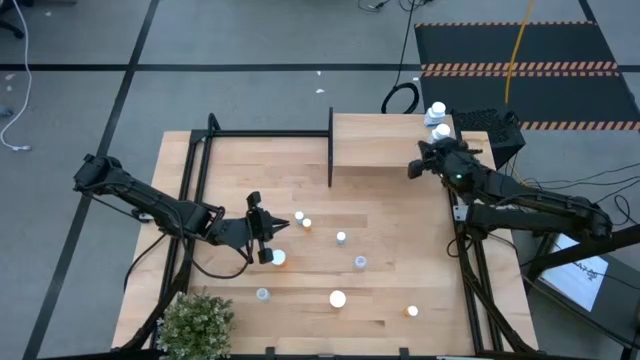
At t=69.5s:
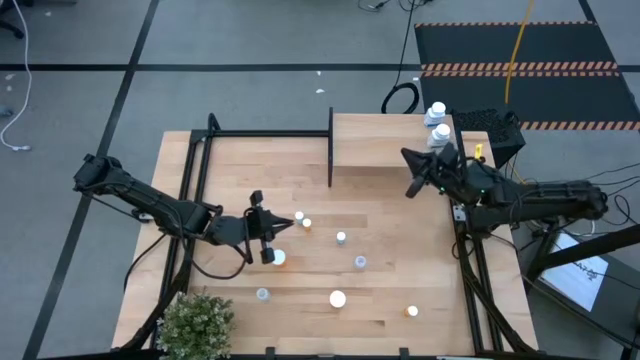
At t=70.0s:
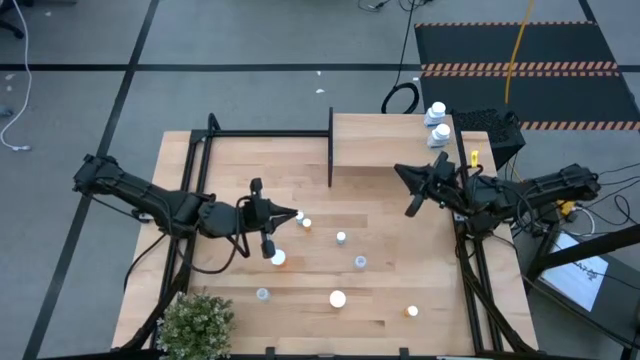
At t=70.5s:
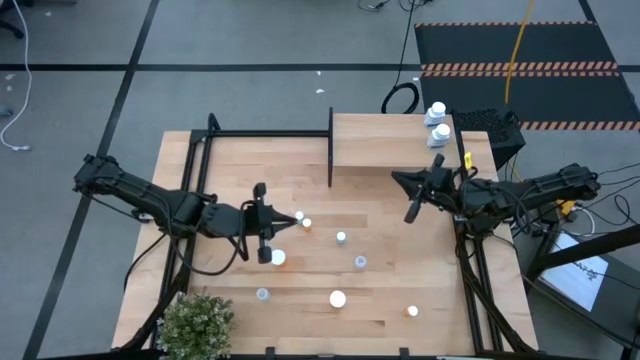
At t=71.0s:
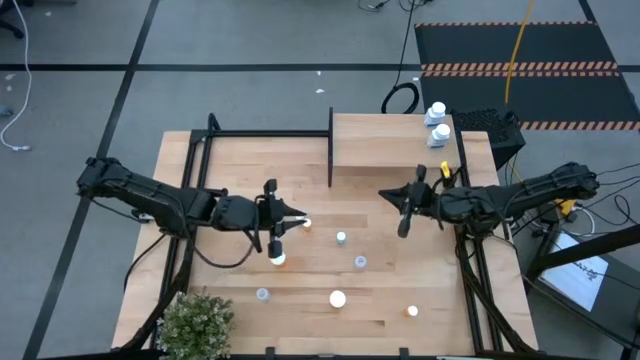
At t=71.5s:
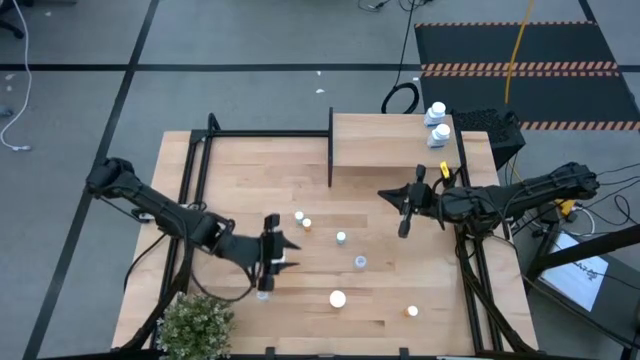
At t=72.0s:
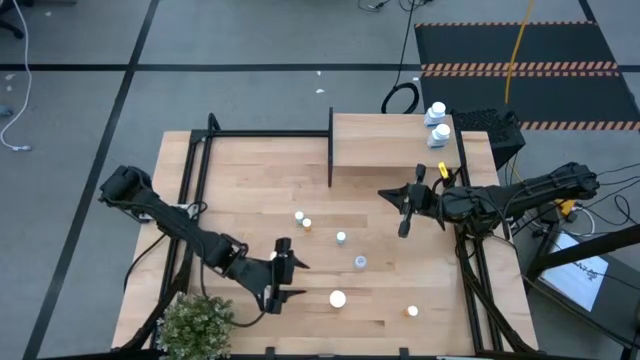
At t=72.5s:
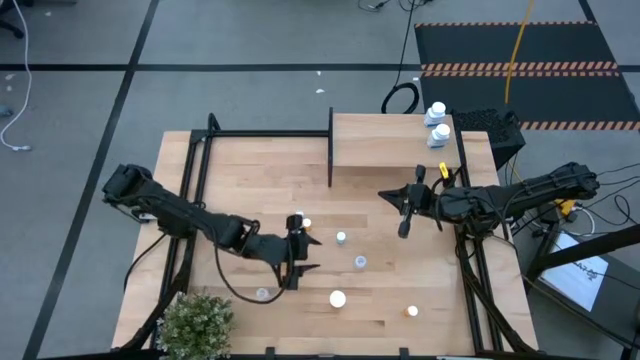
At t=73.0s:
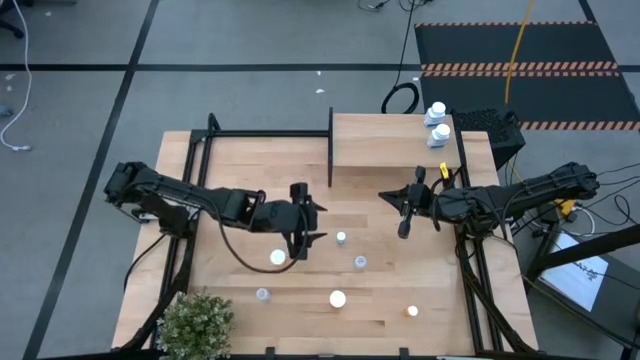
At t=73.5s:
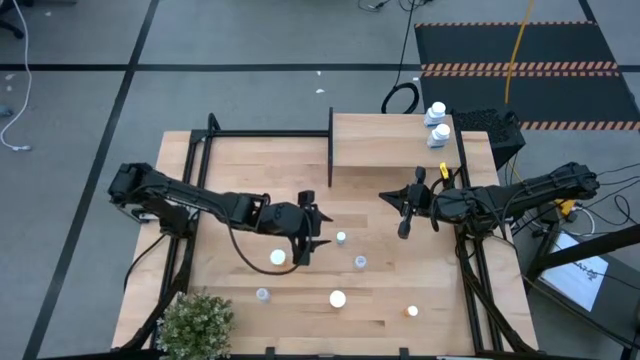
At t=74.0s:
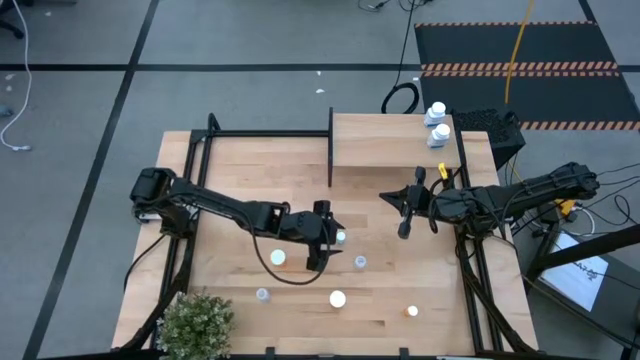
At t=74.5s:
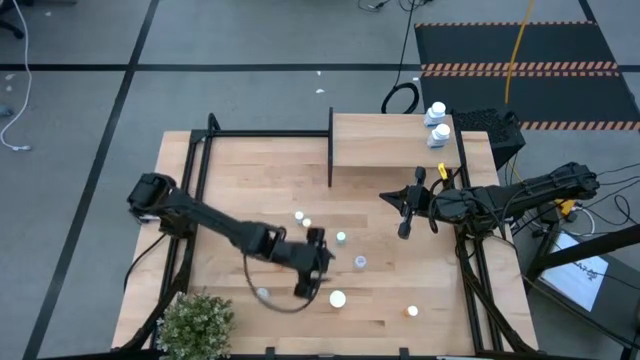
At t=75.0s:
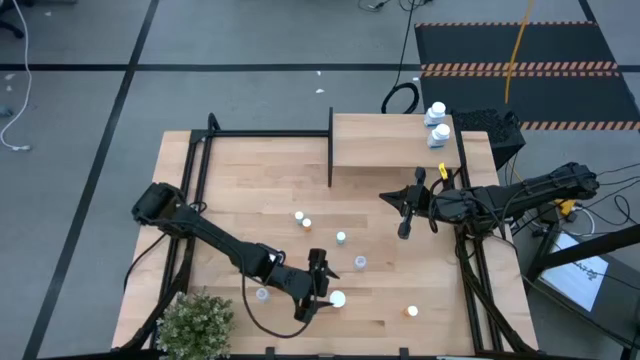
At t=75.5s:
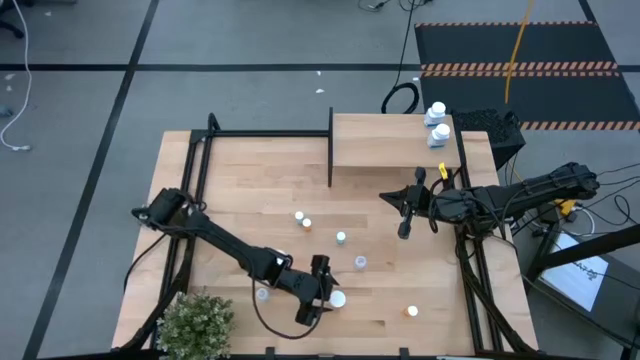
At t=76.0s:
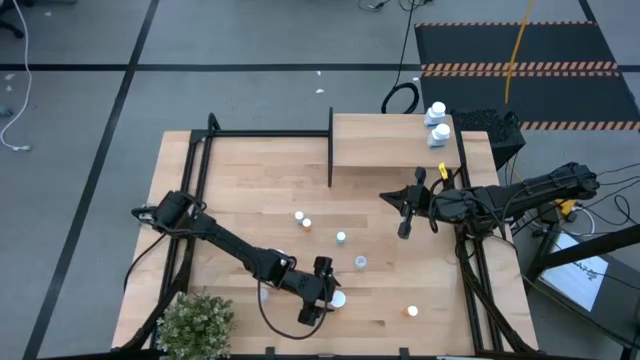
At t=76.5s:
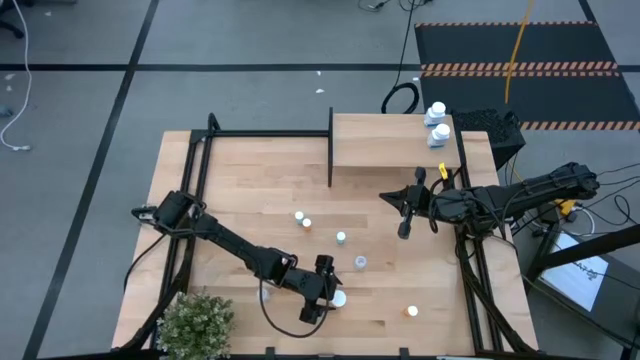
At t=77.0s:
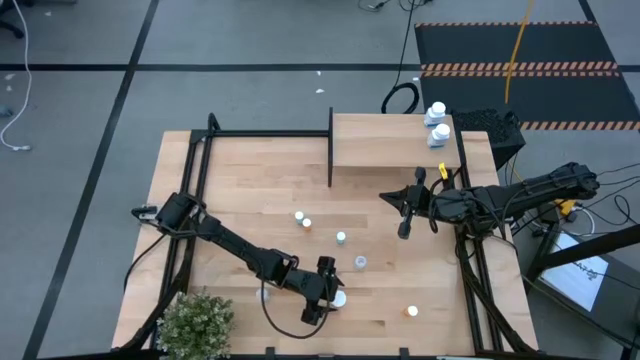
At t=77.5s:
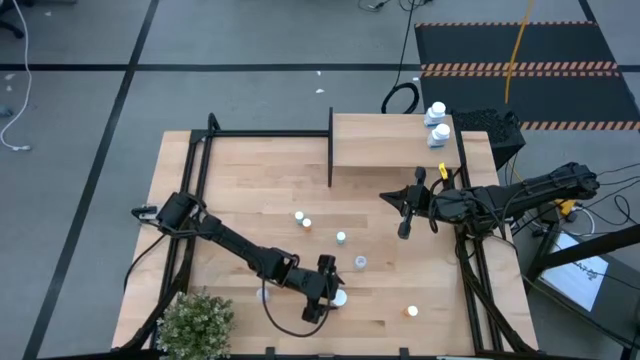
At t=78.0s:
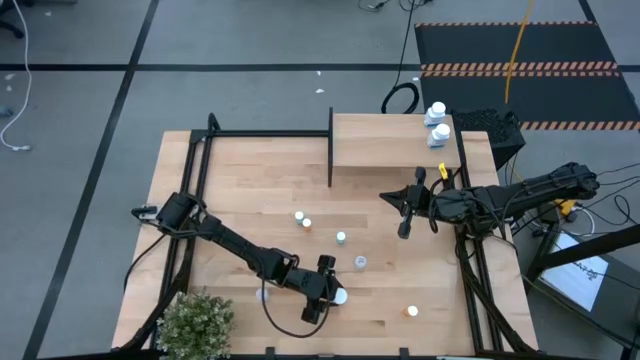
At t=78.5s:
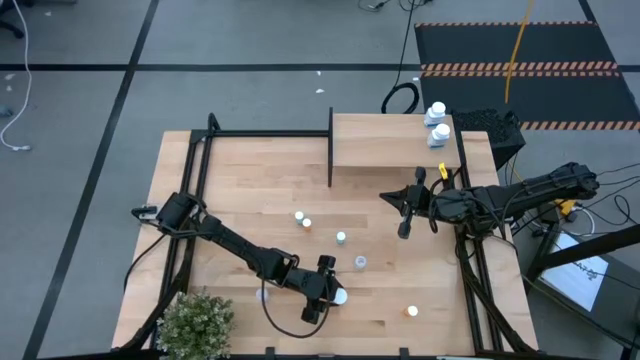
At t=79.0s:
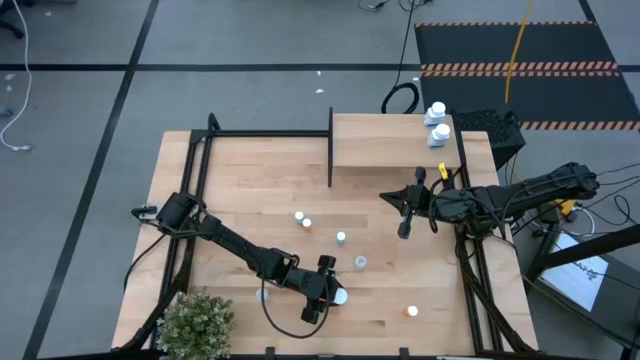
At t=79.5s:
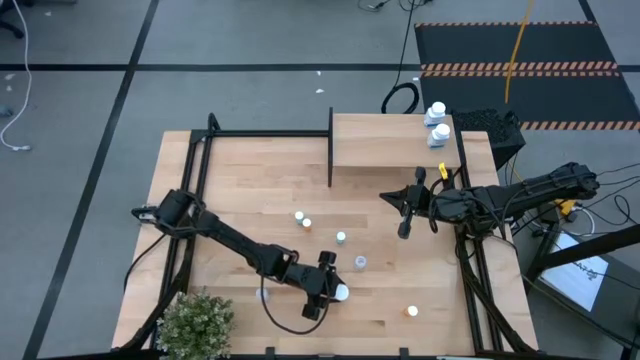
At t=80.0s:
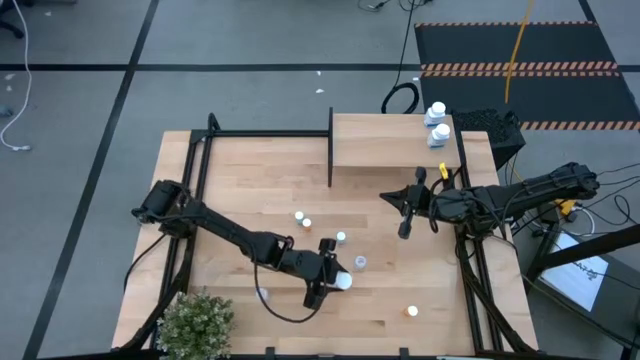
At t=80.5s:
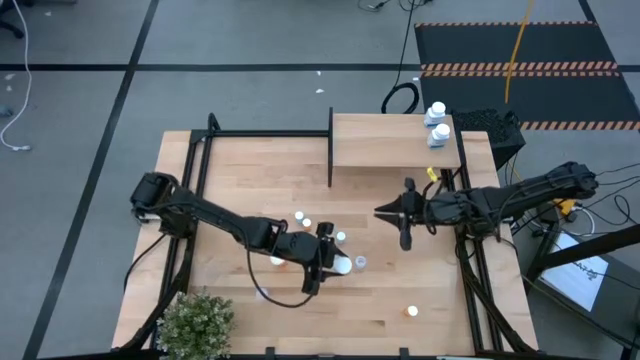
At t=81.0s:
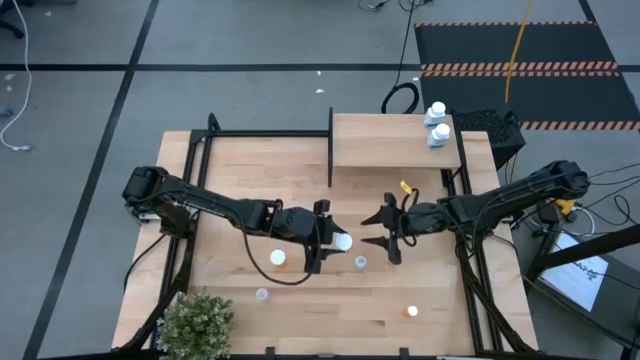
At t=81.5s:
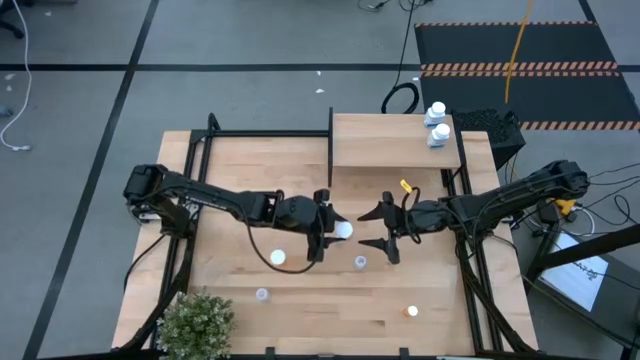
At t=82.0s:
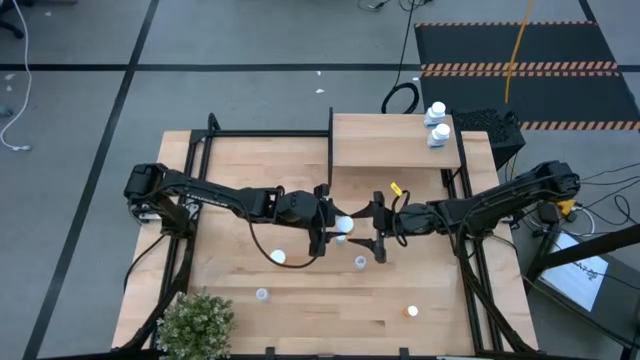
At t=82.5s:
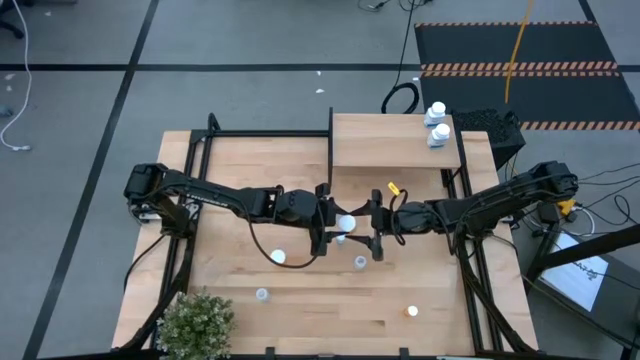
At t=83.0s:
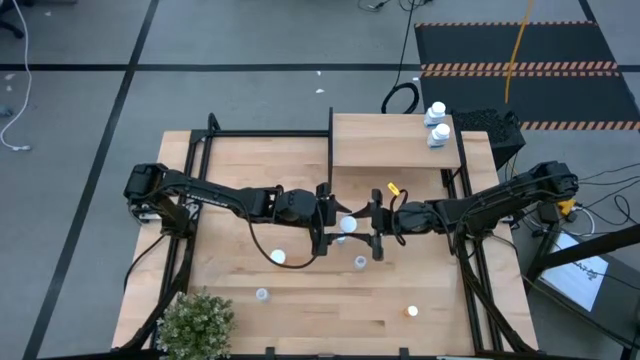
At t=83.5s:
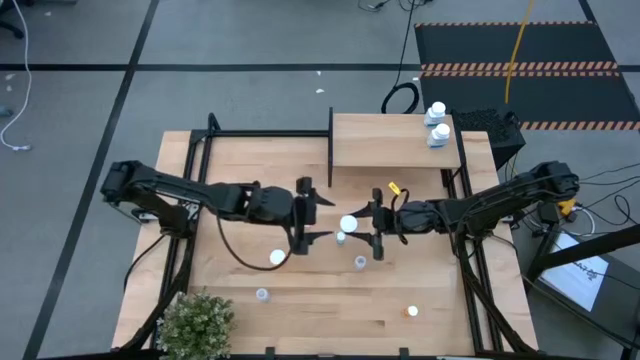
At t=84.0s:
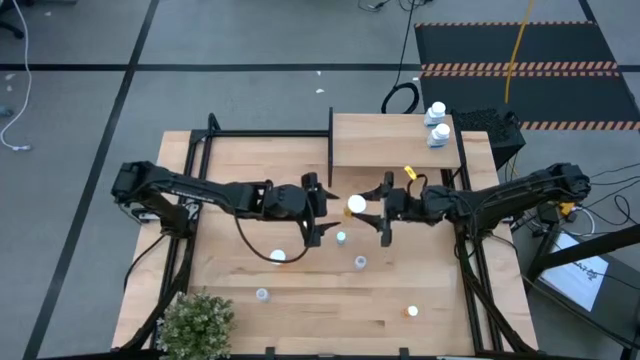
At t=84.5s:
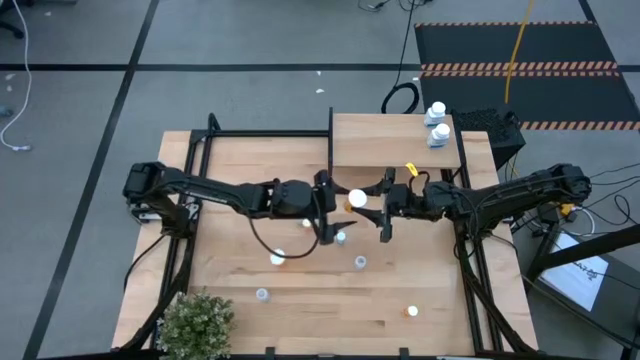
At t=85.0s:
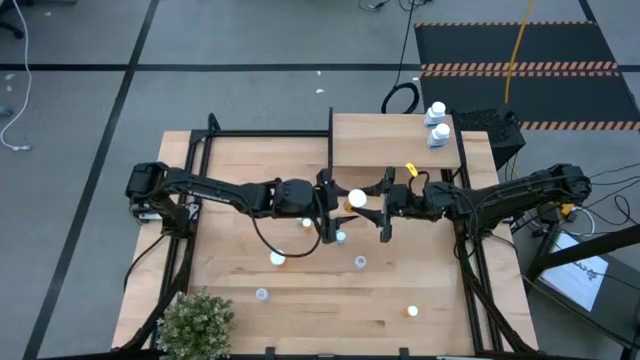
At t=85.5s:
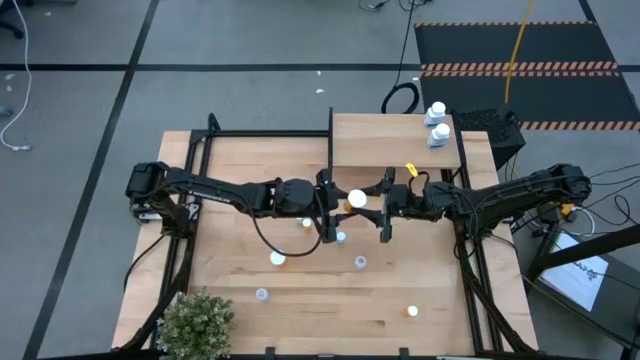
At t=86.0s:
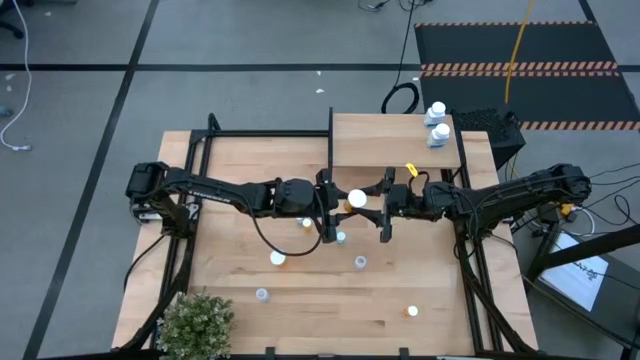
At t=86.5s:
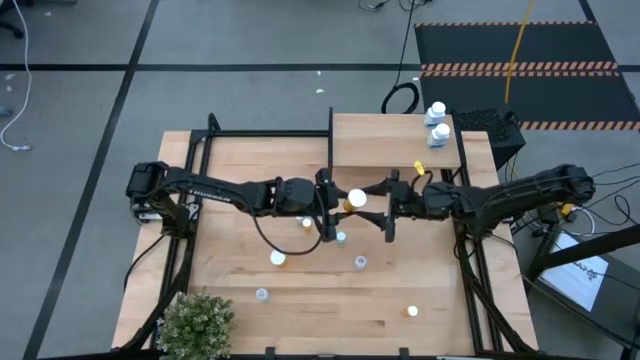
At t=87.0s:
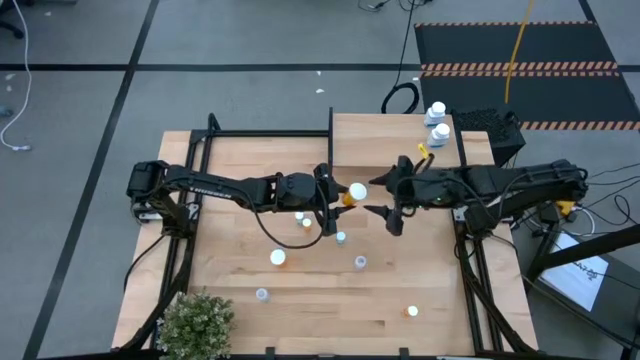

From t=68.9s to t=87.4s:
Task: Pick and place medicine bottles onto shelf by color
Put the bottom large orange pill bottle on the shelf
